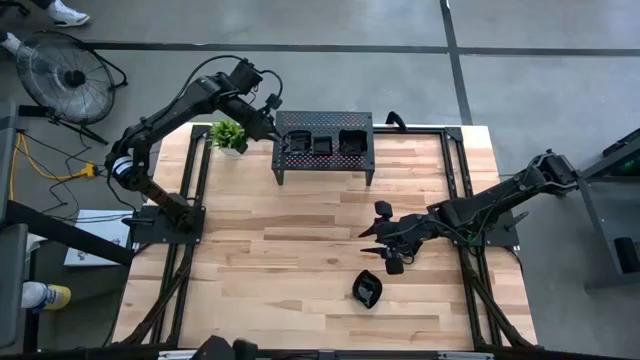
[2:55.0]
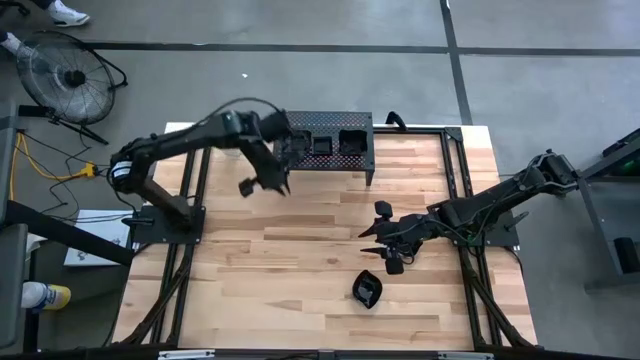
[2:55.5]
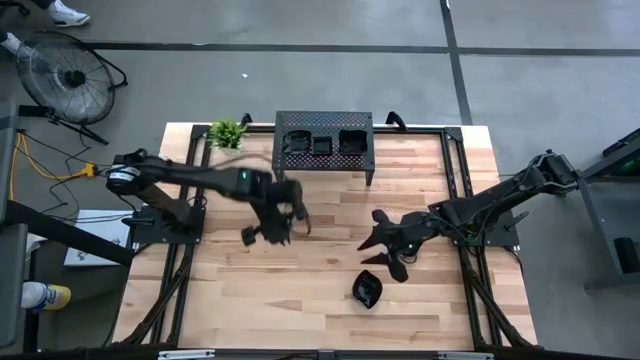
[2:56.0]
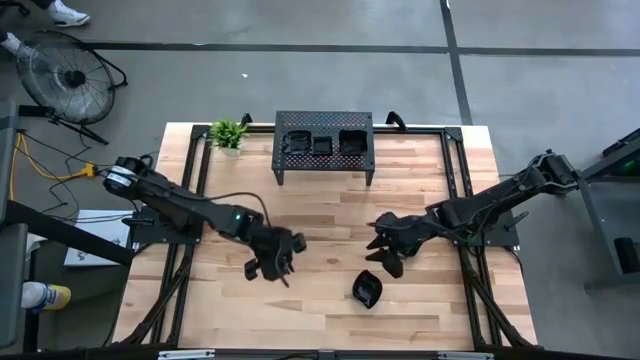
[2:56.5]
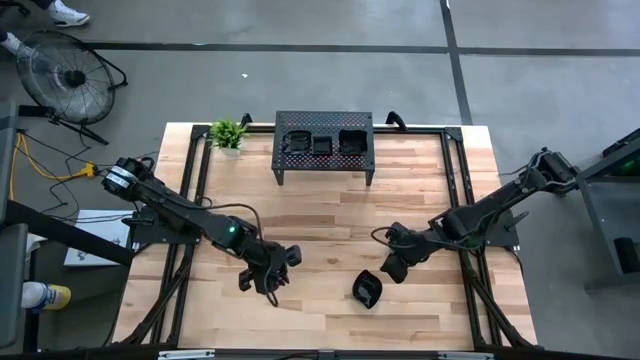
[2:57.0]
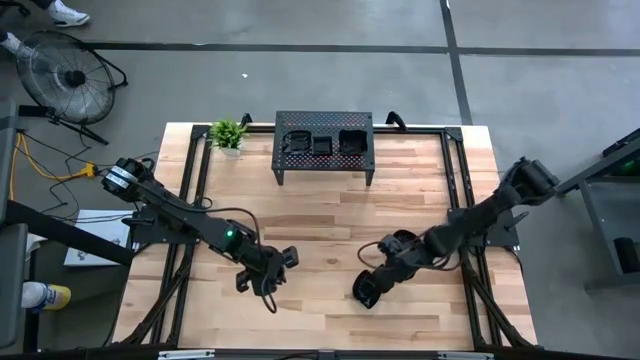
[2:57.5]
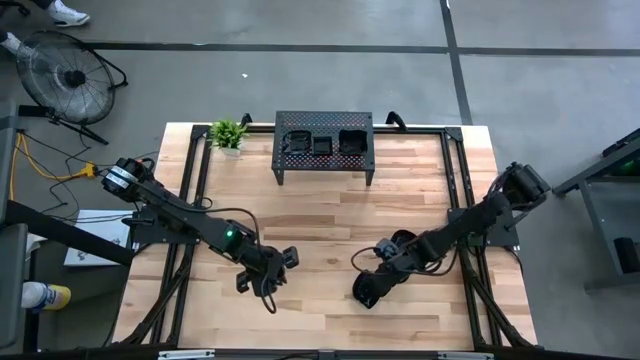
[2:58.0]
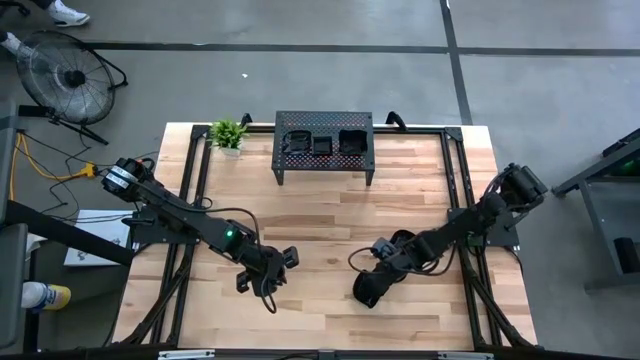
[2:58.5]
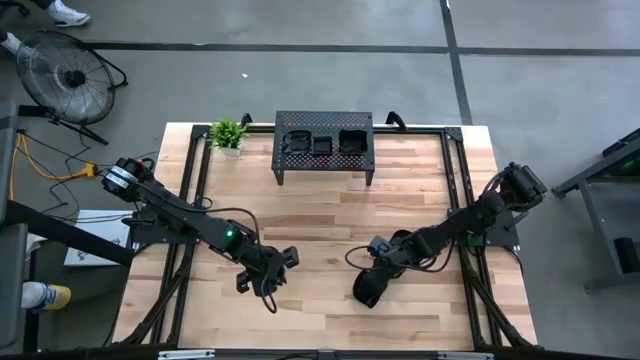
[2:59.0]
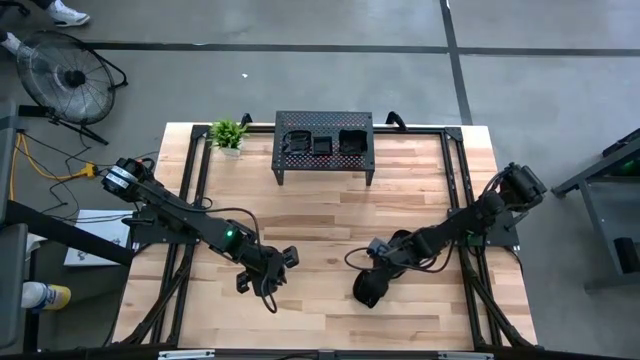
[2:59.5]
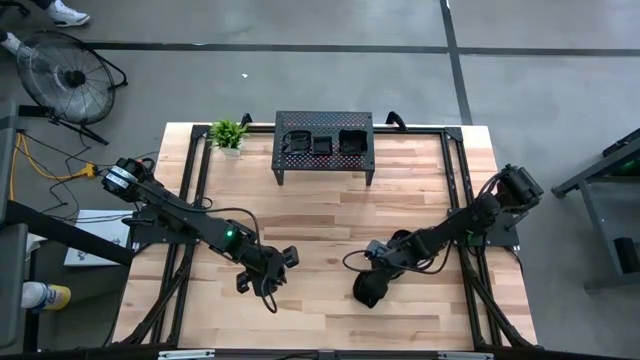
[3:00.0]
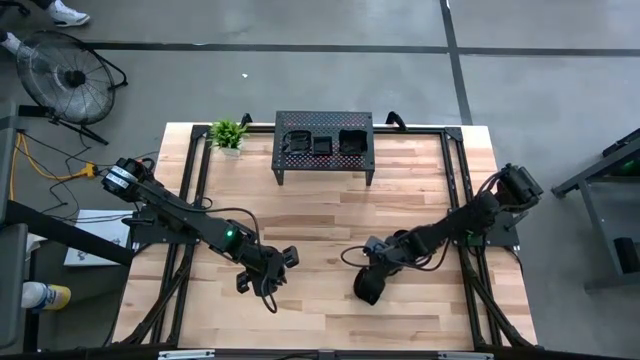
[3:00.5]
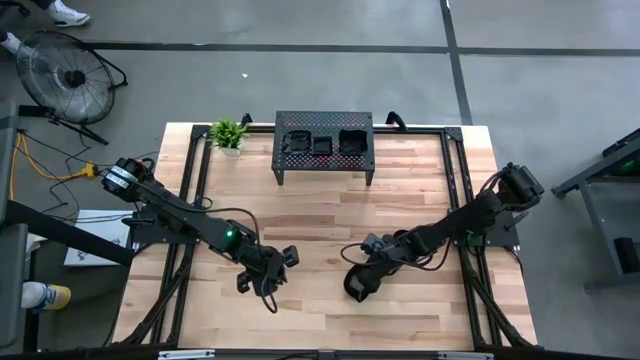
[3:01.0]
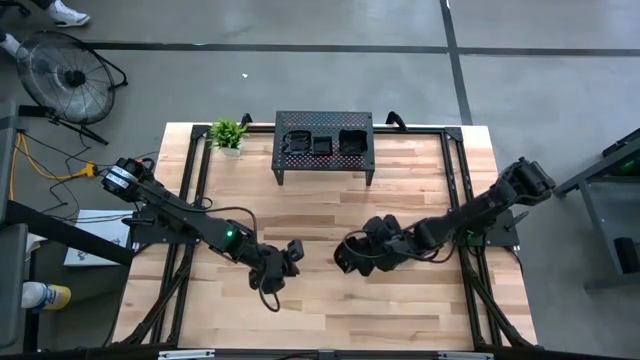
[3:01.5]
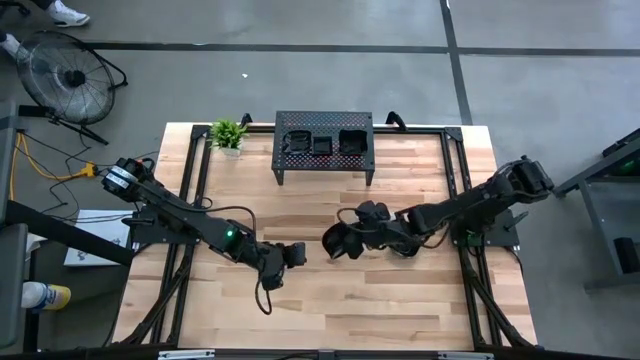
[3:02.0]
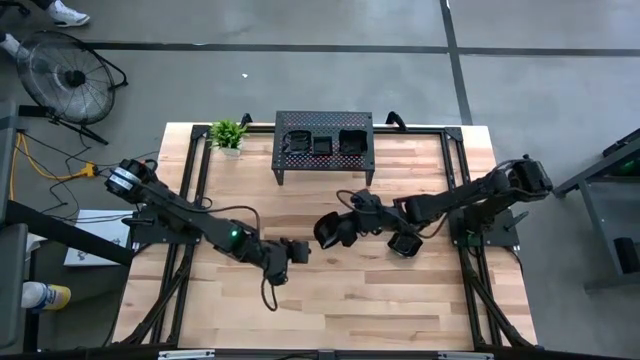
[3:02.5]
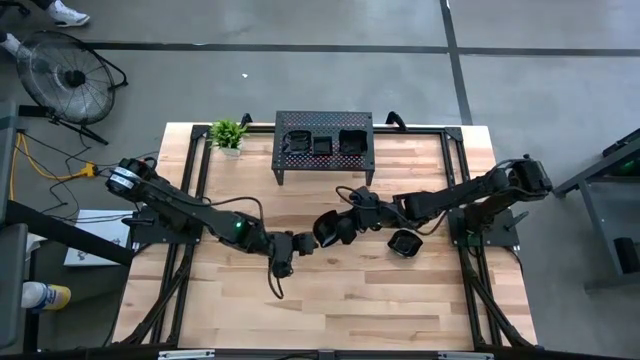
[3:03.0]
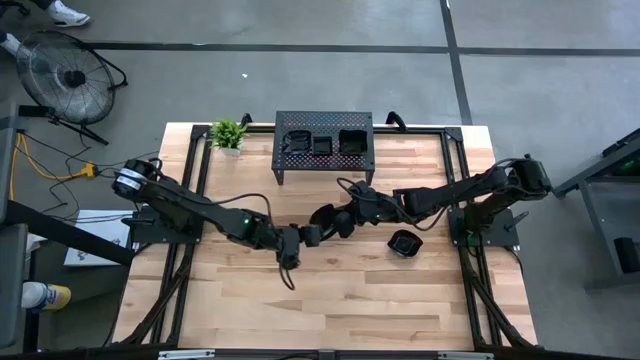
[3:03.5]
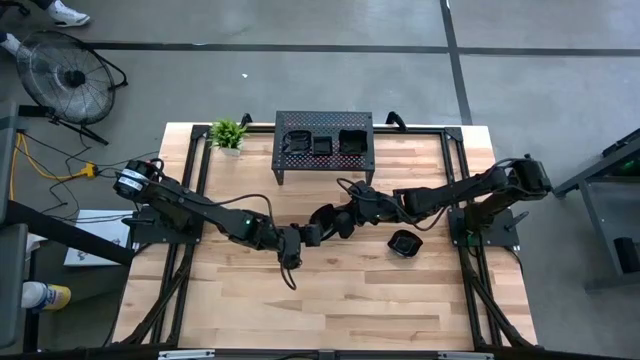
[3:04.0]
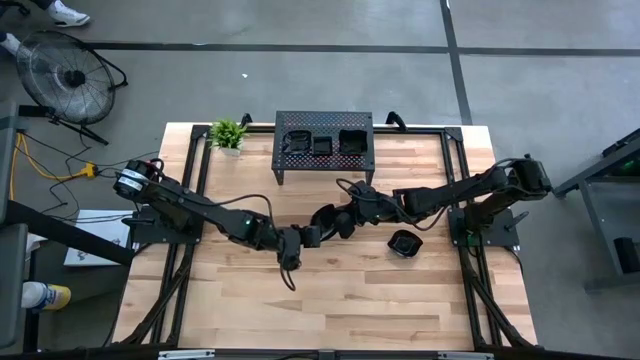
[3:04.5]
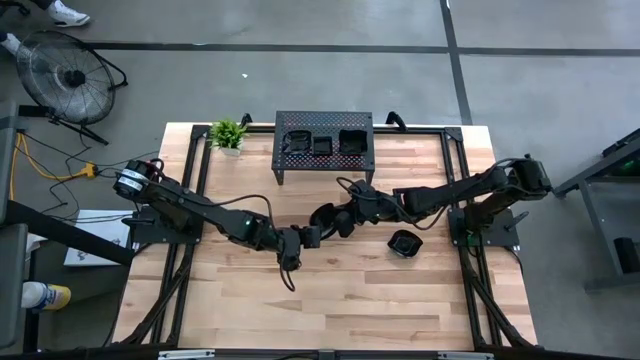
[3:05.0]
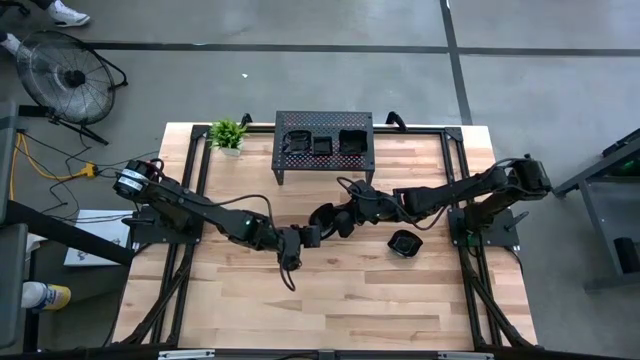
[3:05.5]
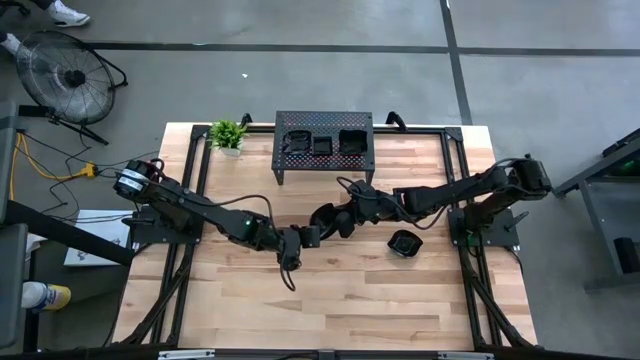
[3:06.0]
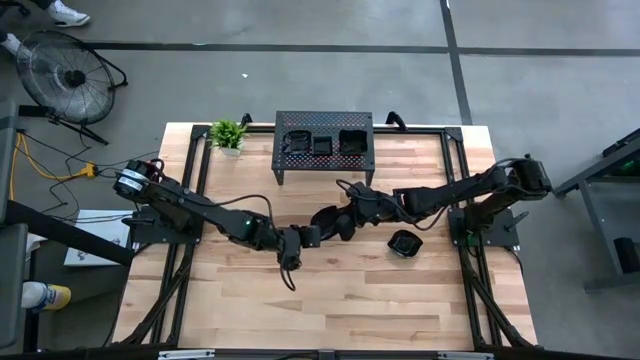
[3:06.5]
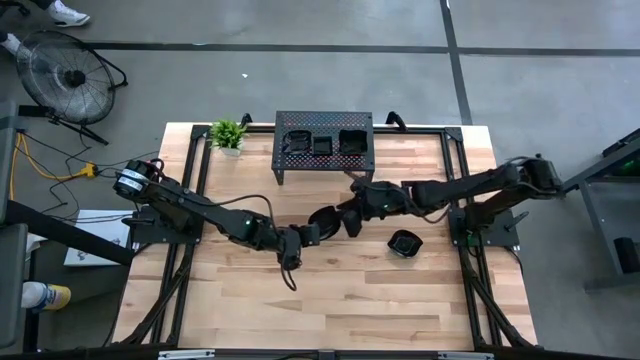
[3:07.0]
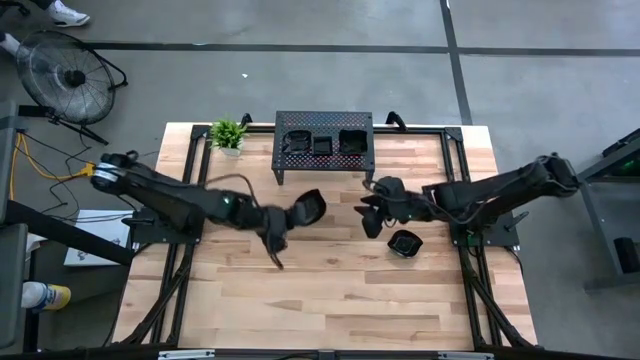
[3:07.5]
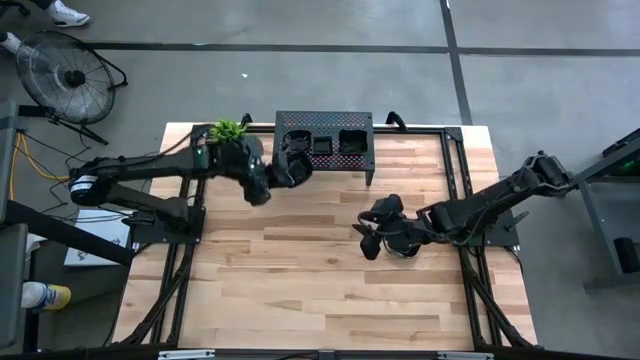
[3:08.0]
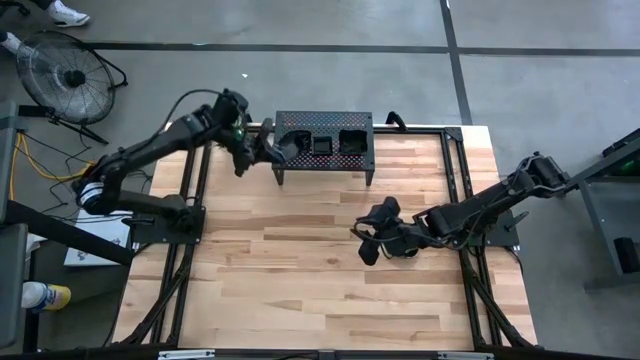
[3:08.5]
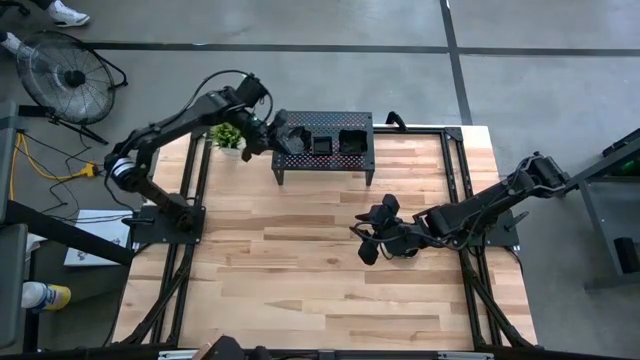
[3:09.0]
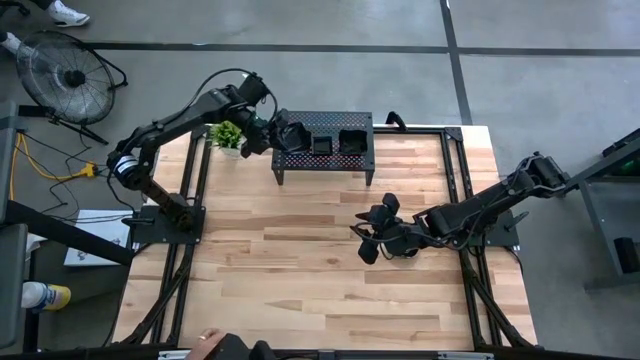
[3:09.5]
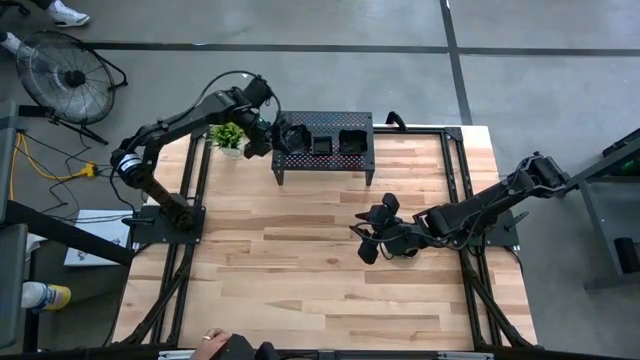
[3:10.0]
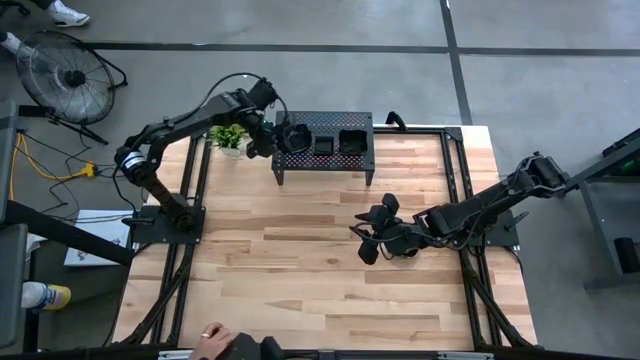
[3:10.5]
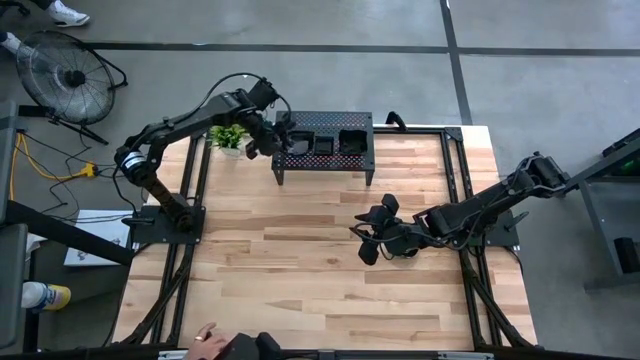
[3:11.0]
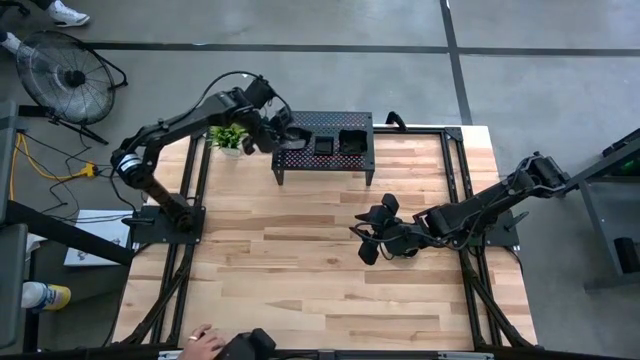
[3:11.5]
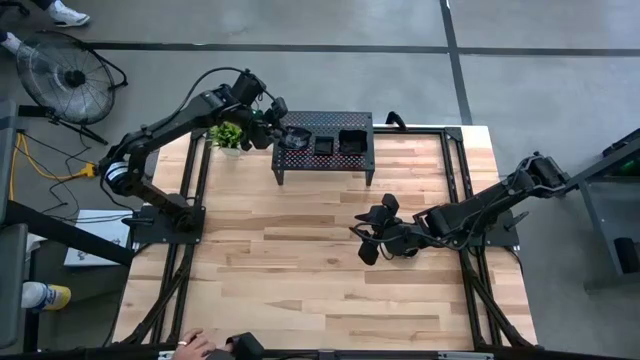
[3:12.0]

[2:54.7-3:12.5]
Task: Pick & Place Mini shaped plates
Stack the leaf-shaped plate on top of the leaf-shaped plate on the shelf

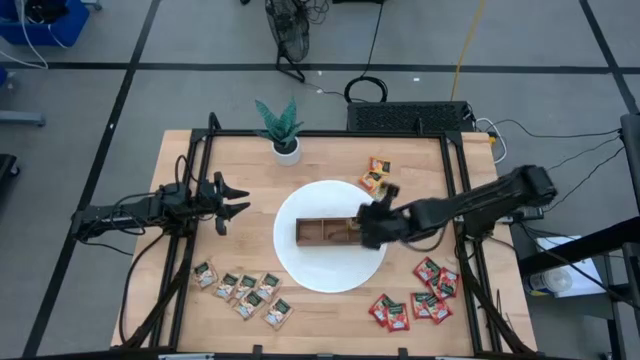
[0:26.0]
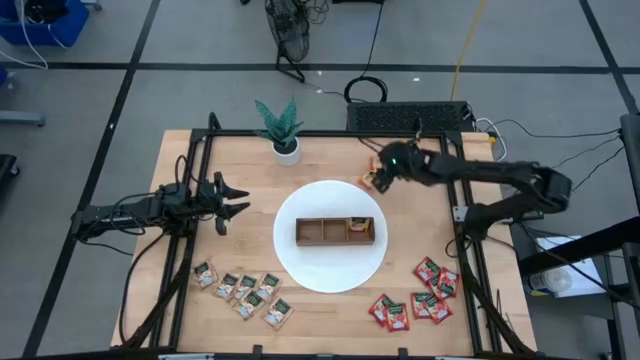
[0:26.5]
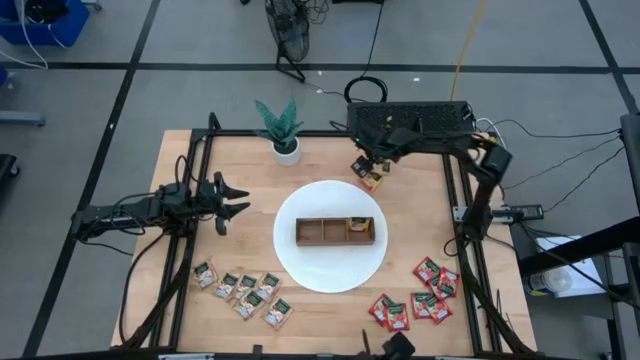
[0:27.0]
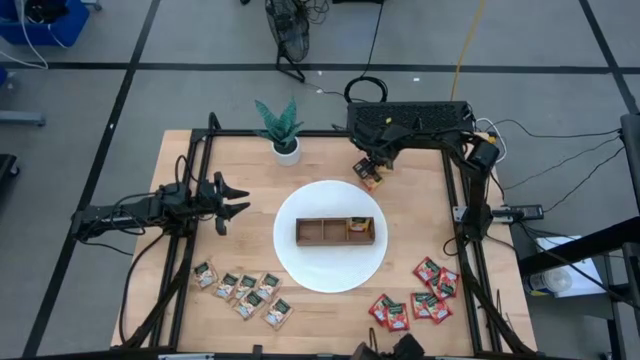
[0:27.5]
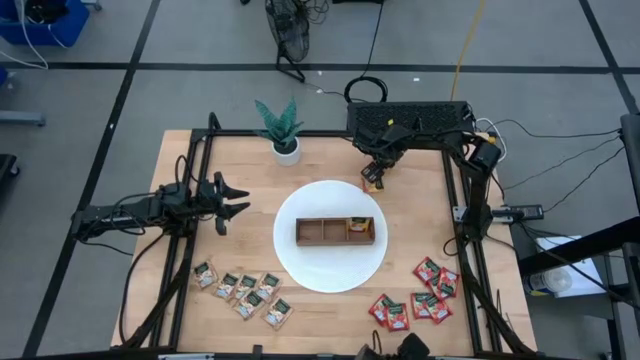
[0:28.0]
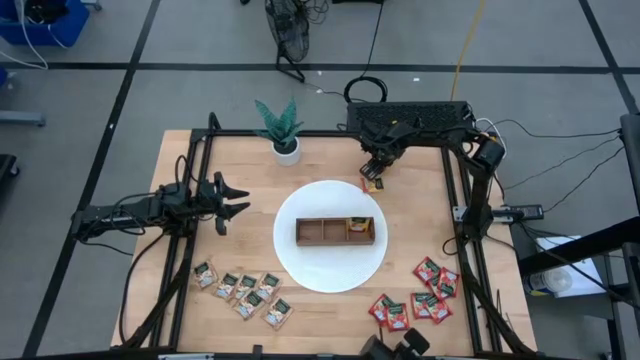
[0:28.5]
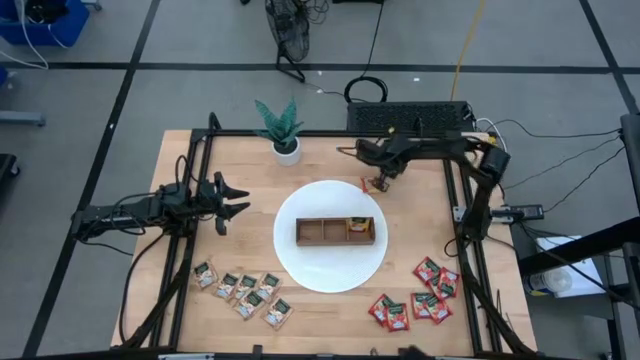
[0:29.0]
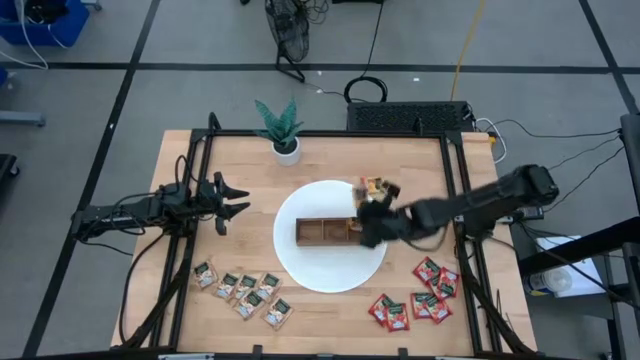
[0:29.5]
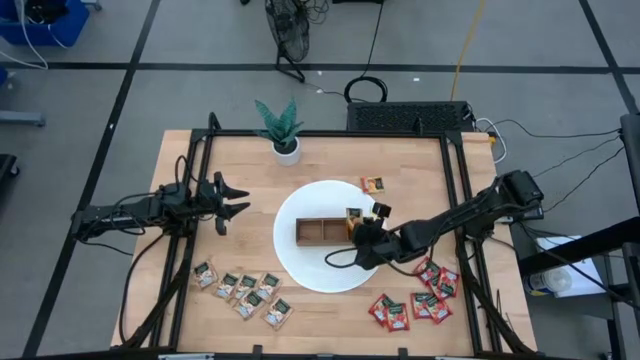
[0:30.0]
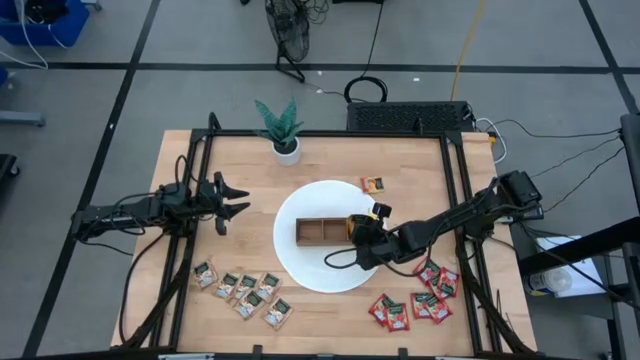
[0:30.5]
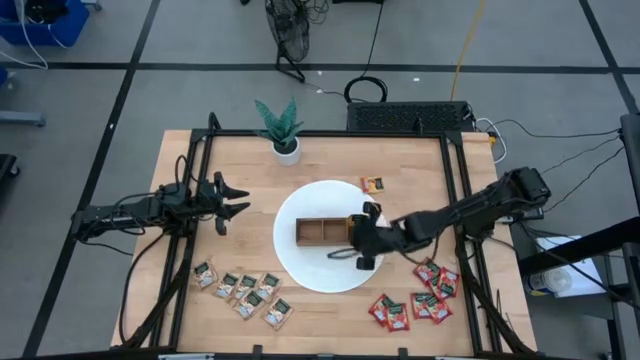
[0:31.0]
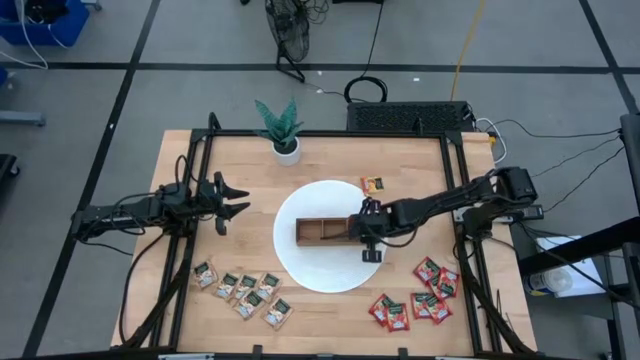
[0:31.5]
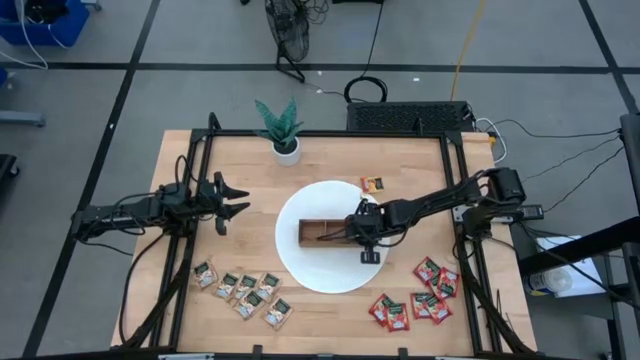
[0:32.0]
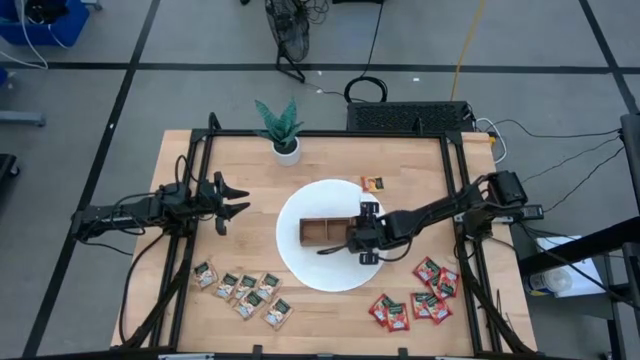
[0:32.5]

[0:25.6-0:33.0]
Task: Pick & Place Tea
Put the yellow tea bag into the right section of the wooden organizer
